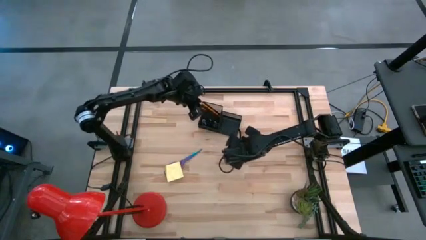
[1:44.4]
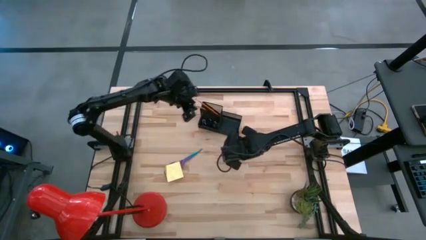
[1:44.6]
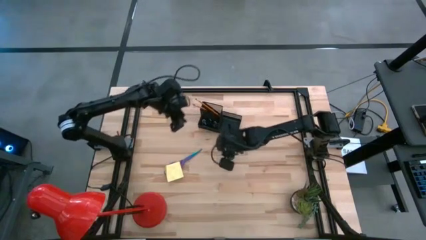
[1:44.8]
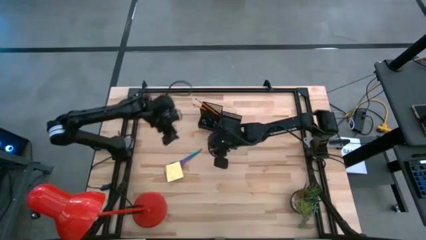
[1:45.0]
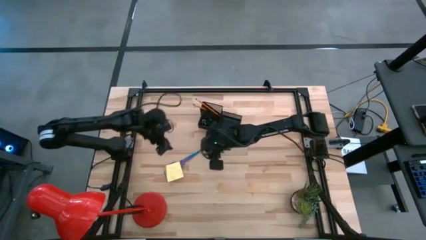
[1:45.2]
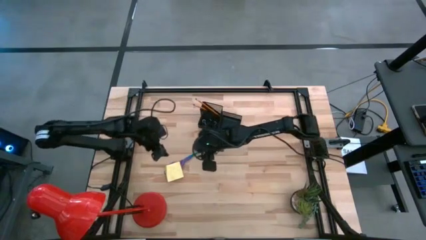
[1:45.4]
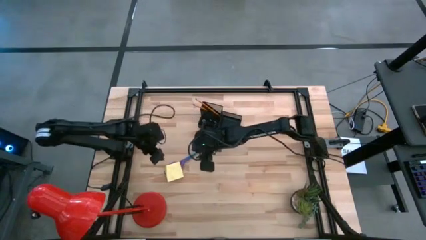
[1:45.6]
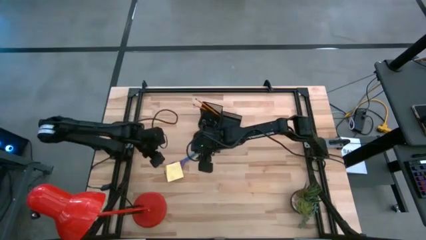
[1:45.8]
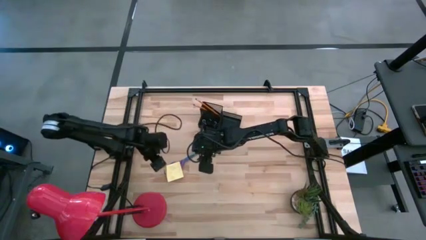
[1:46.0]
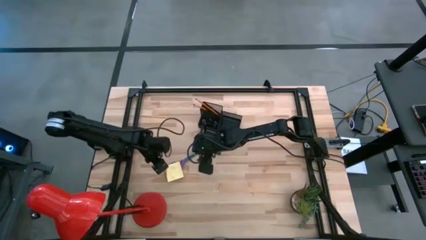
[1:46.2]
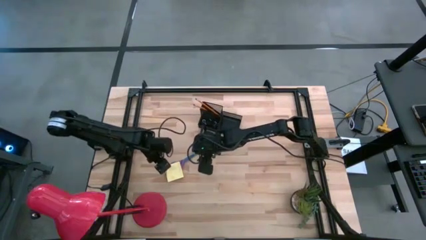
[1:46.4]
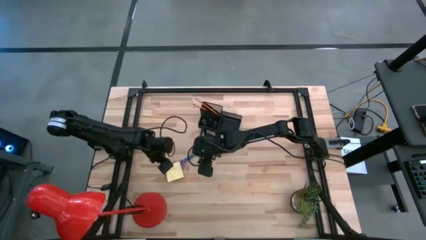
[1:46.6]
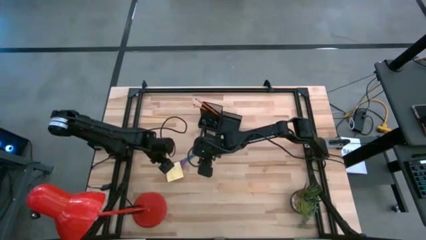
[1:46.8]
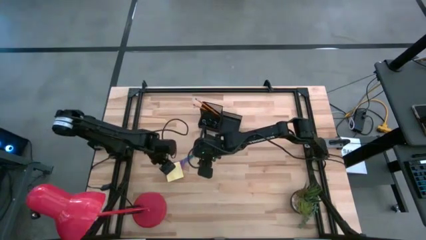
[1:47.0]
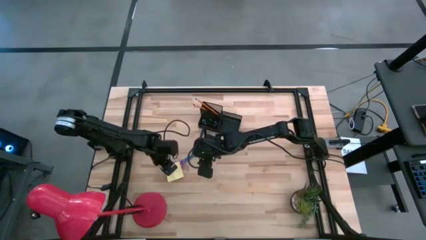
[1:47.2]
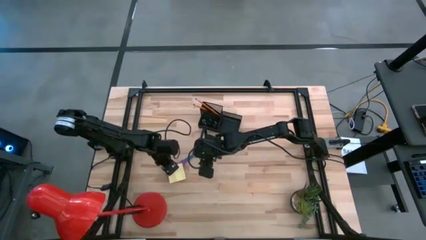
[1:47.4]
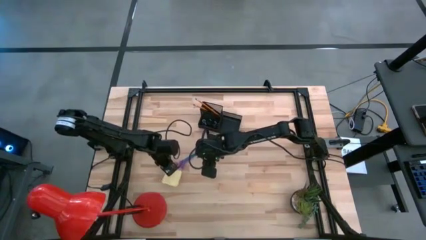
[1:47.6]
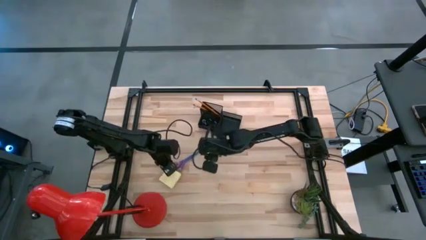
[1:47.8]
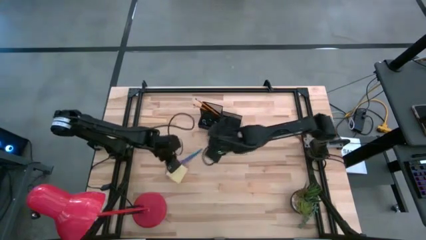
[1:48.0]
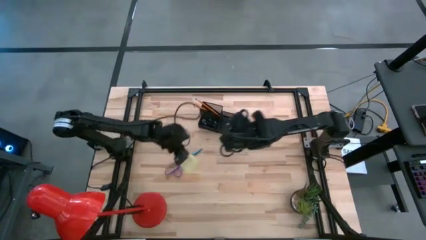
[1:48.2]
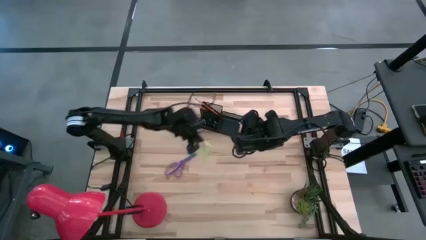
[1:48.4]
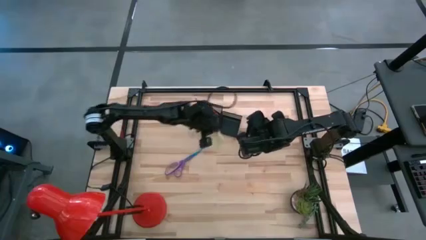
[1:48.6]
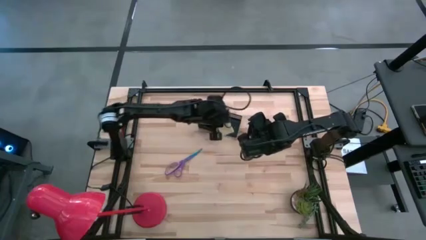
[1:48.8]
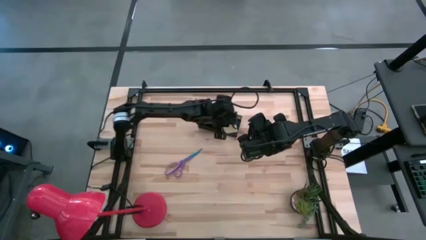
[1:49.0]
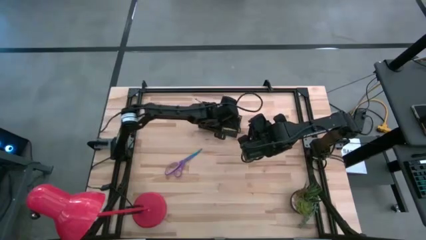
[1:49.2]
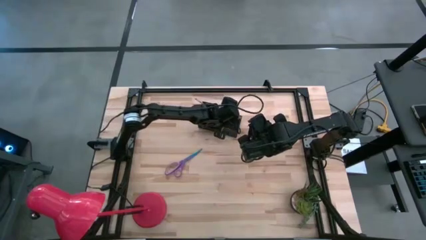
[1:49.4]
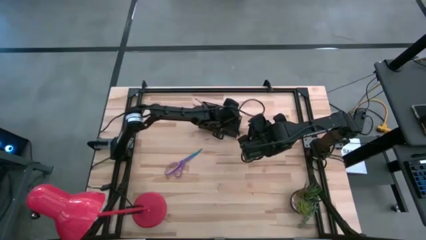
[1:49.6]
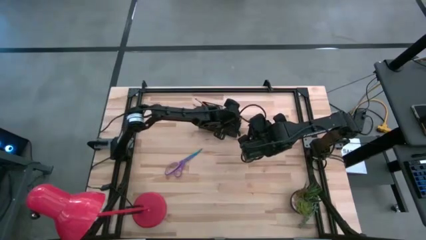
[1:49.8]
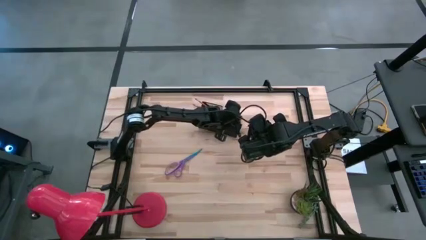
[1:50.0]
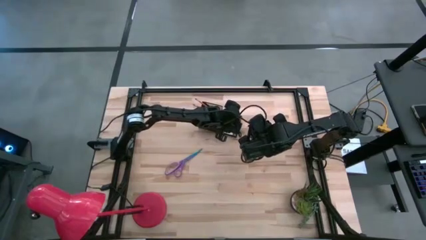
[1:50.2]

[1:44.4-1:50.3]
Task: Pick and place office supplies into organizer
Put the yellow sticky notes into the black desk organizer

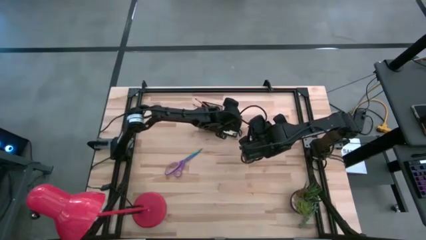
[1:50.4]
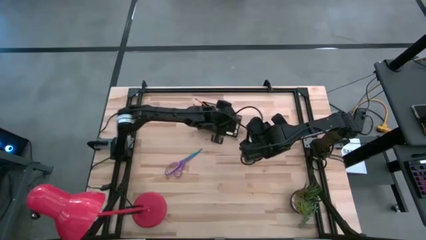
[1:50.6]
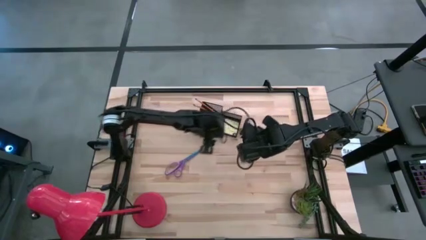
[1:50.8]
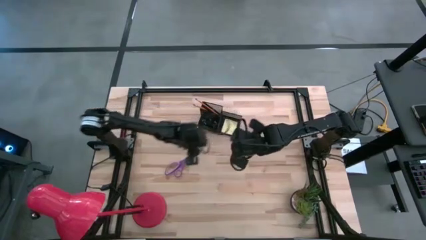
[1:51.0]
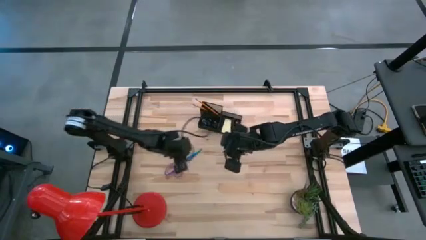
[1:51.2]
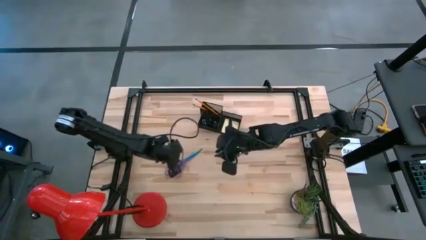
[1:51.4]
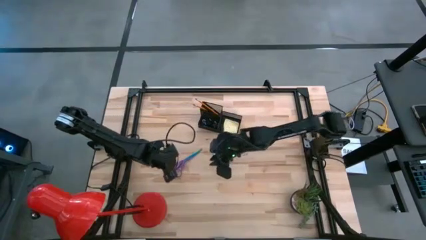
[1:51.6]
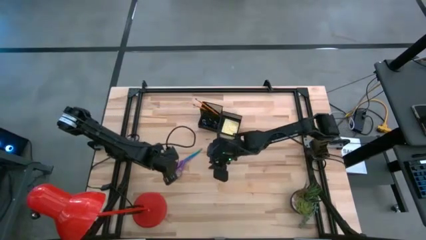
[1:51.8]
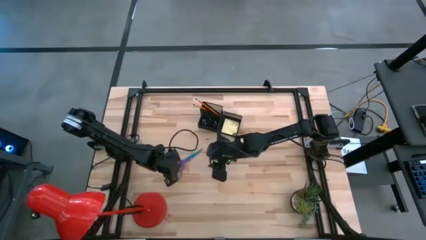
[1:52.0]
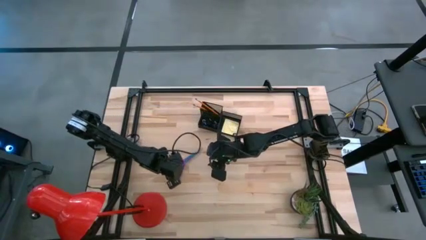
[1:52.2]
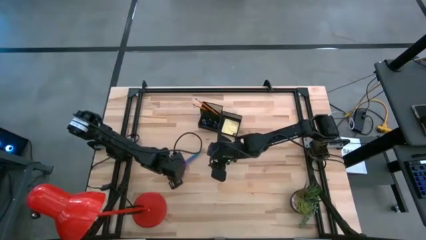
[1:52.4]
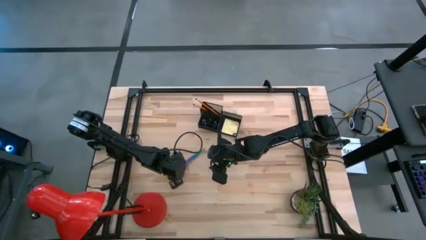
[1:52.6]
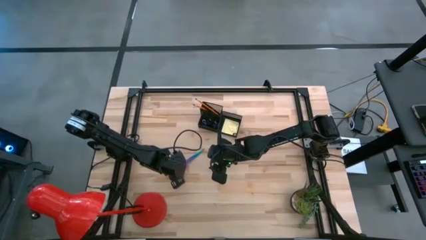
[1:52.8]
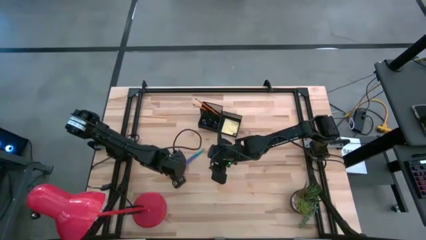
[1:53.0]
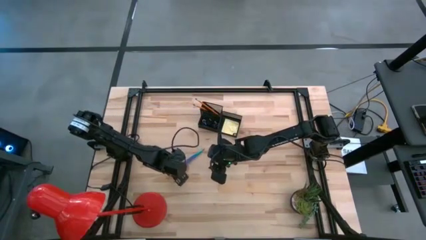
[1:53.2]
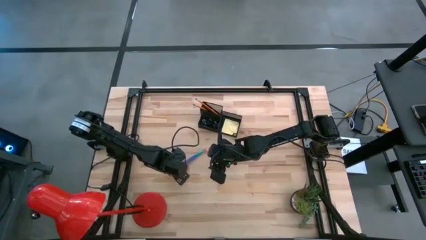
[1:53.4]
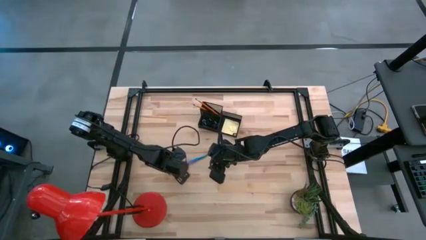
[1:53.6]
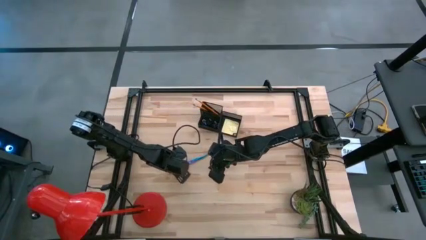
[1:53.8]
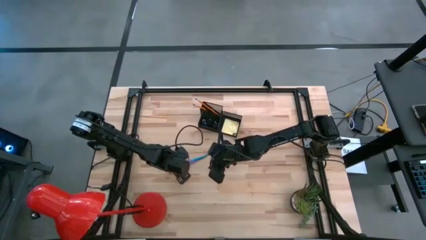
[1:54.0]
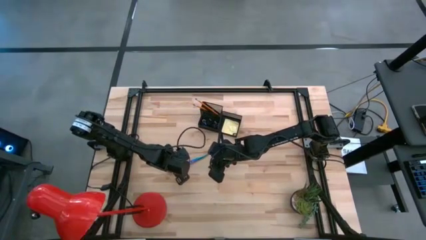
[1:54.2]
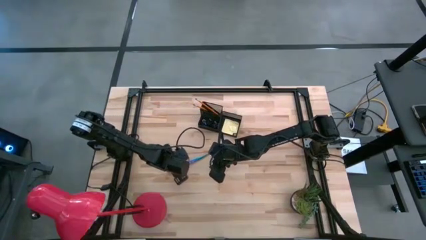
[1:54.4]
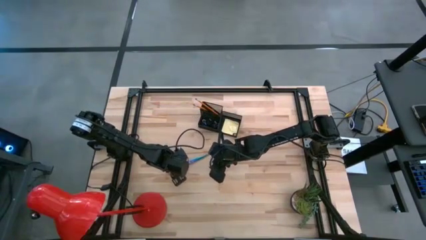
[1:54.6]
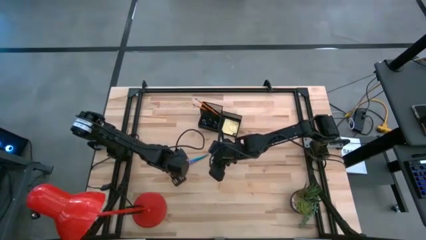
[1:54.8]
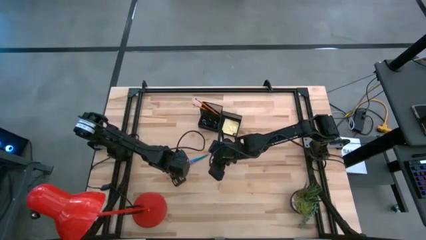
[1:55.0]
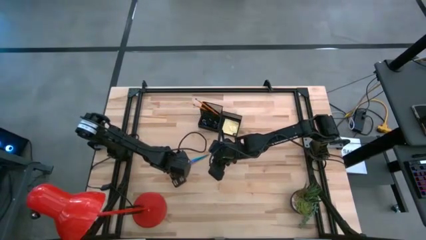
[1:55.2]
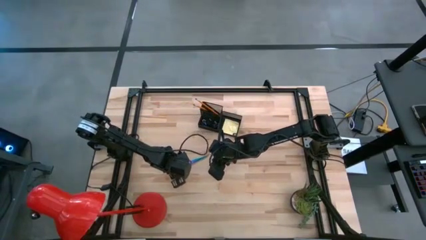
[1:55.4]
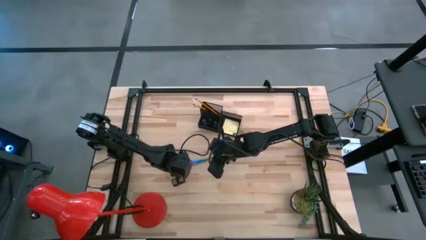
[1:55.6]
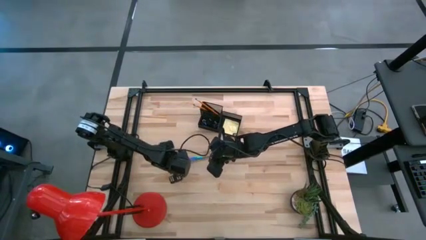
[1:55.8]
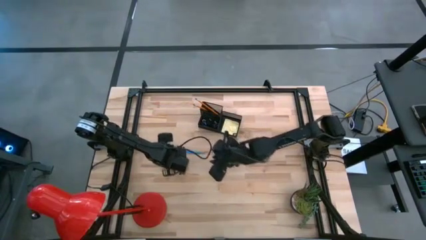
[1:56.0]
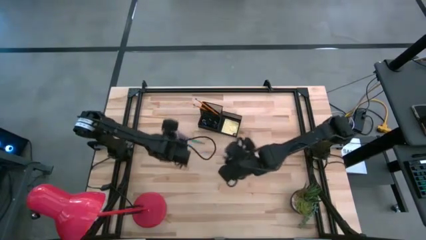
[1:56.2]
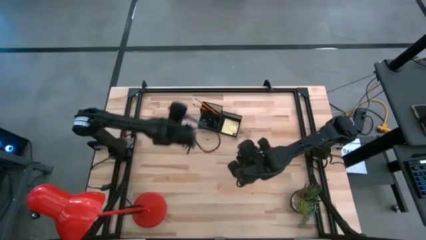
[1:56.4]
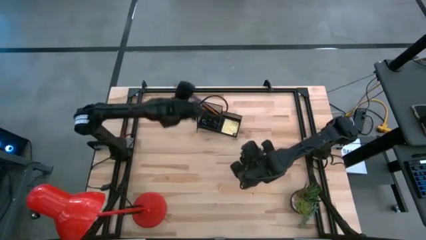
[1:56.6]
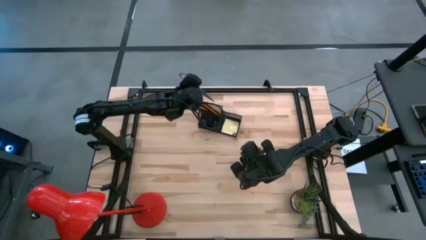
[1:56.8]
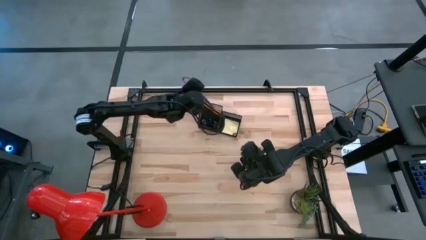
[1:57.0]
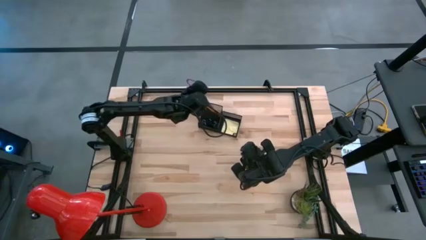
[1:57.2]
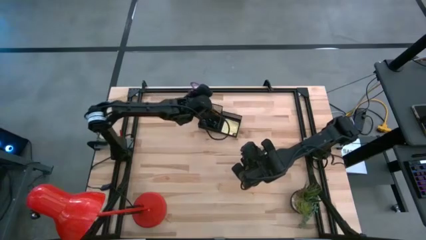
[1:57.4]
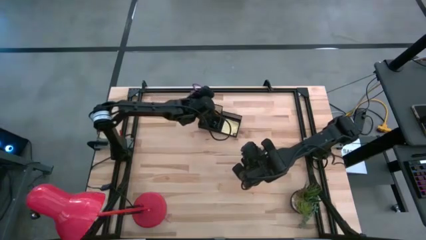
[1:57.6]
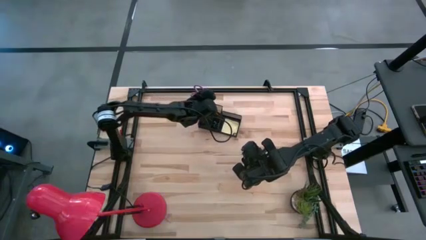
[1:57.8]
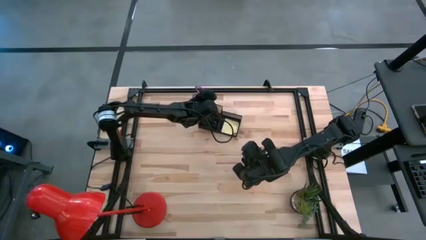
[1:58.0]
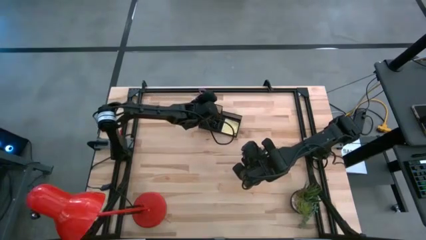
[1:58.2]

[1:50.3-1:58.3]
Put the violet scissors into the black desk organizer

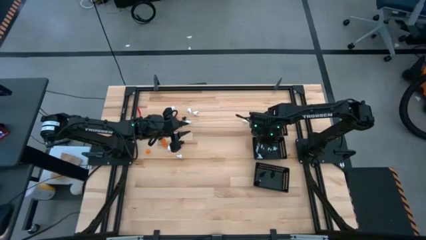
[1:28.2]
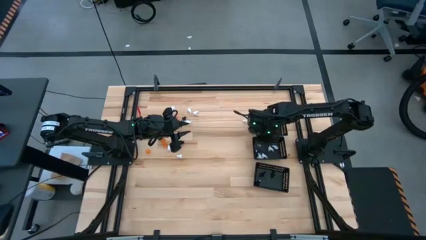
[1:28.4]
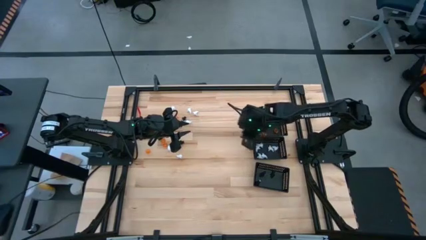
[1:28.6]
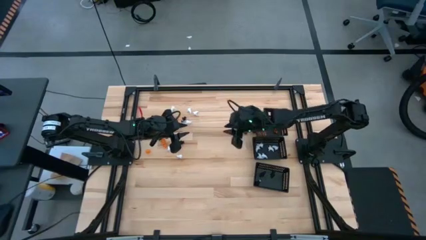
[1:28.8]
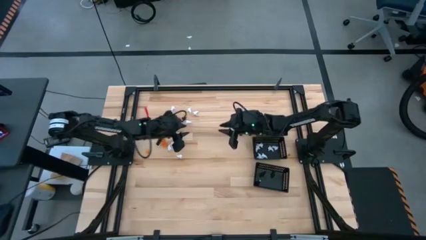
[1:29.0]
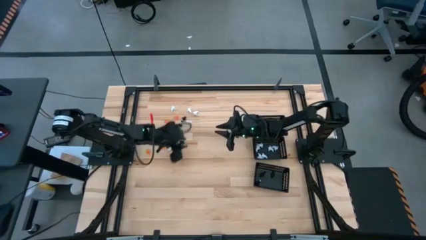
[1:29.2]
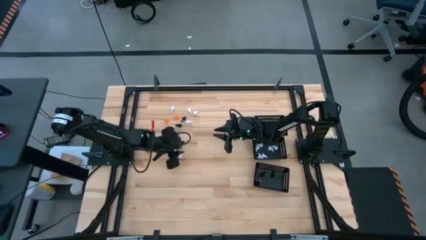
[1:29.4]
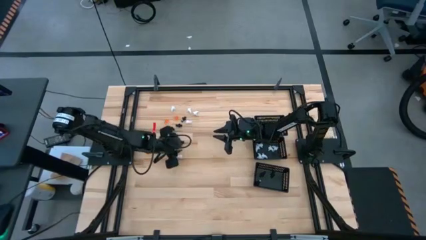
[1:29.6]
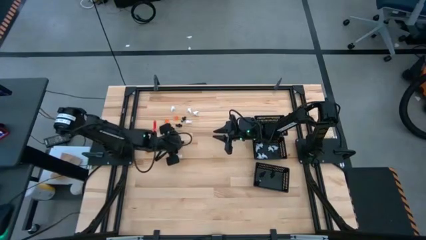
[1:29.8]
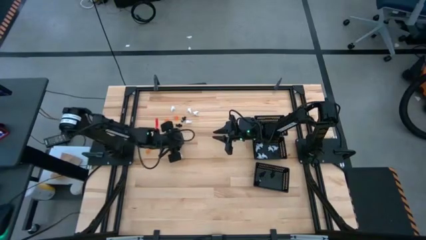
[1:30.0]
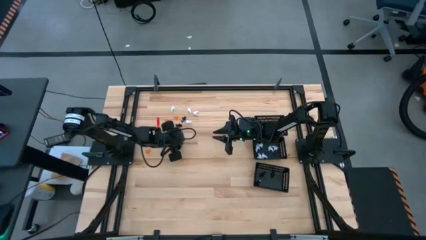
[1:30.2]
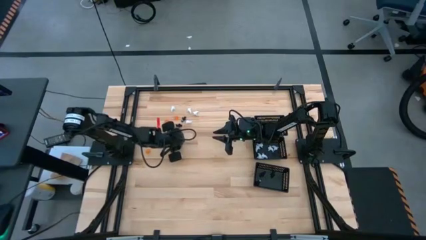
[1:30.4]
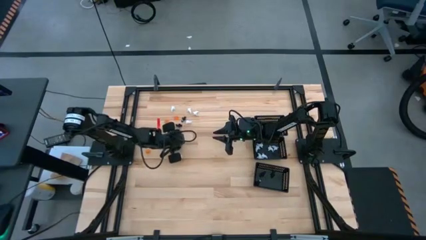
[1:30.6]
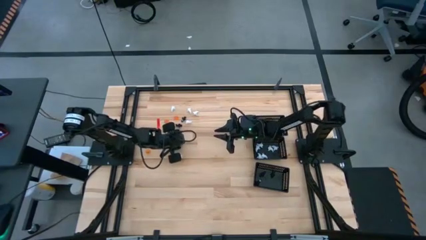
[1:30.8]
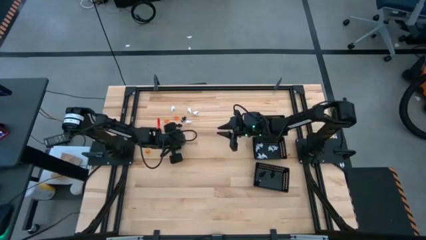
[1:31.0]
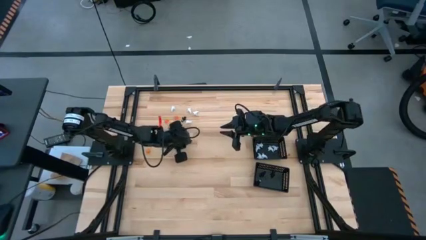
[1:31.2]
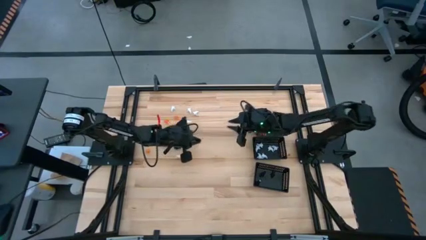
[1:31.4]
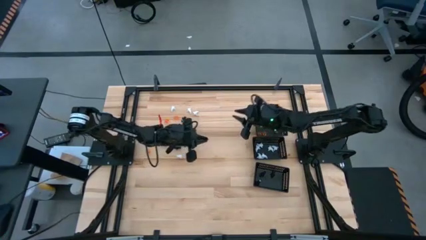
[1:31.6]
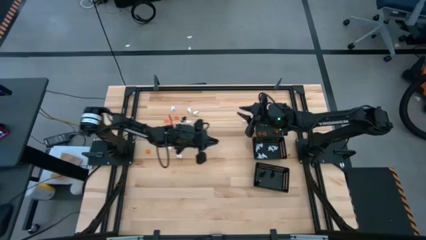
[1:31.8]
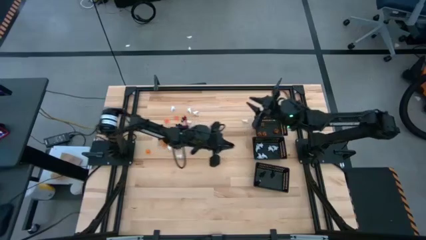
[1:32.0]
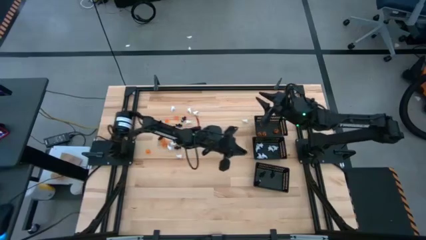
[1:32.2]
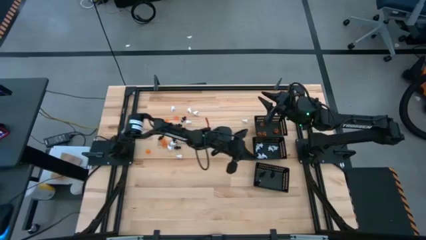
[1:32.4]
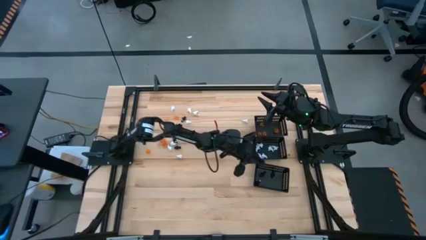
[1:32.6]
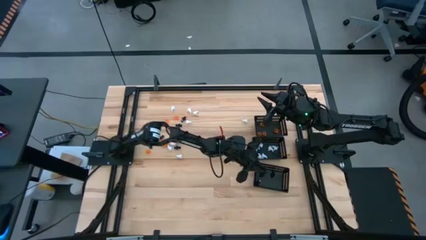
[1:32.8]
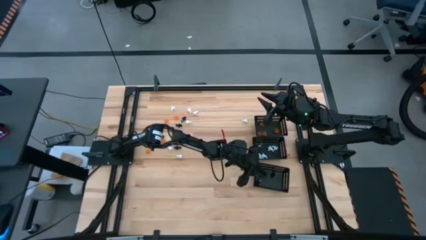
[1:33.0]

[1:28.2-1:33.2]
Task: Sort Halloween decoration
Put the black skeleton toy into the bottom black bin
